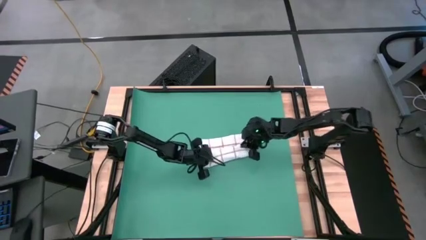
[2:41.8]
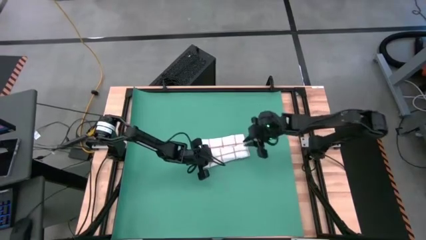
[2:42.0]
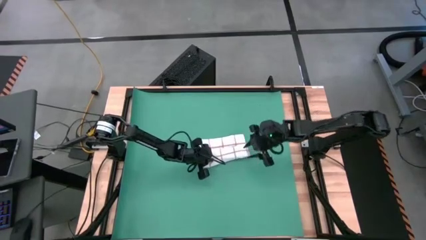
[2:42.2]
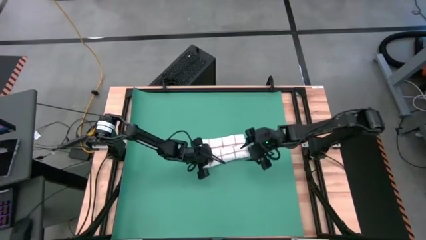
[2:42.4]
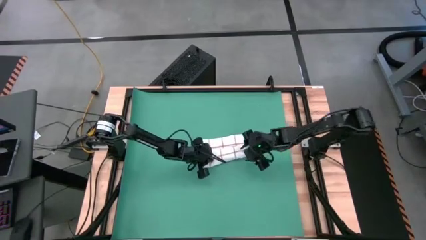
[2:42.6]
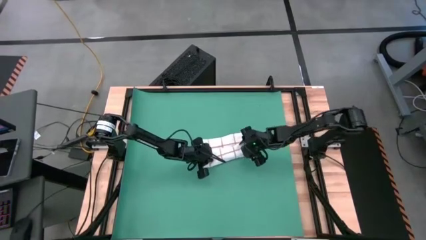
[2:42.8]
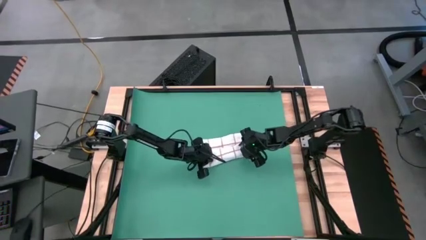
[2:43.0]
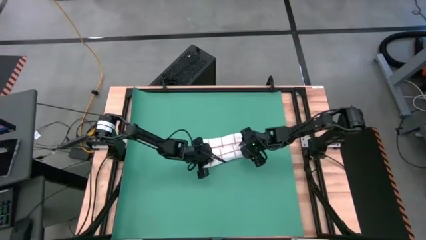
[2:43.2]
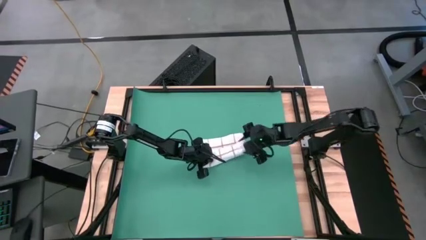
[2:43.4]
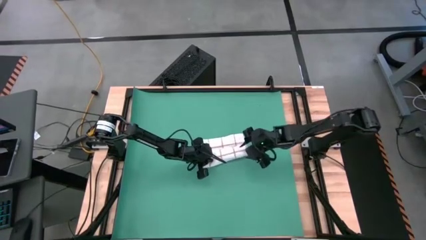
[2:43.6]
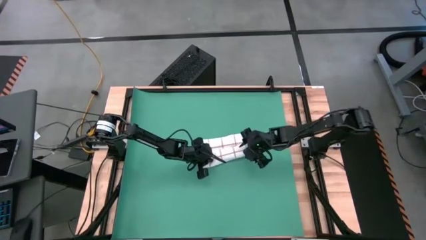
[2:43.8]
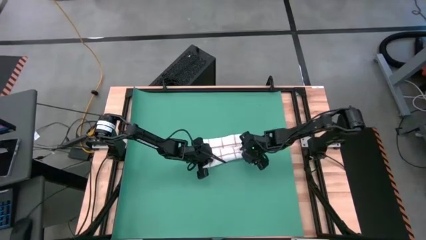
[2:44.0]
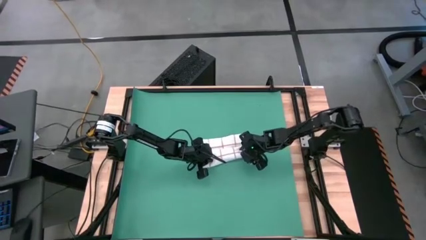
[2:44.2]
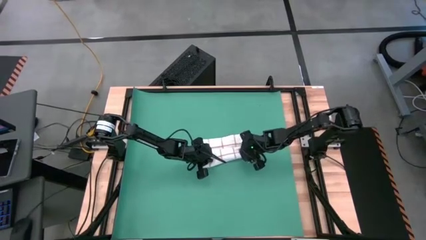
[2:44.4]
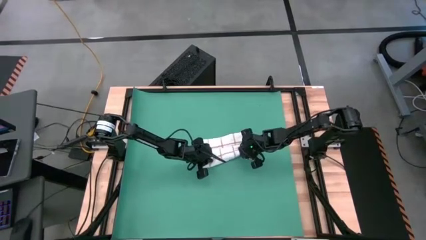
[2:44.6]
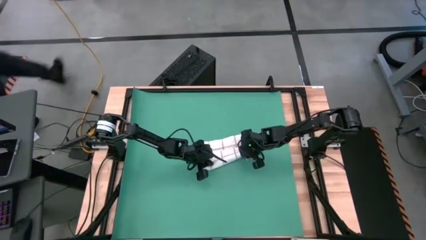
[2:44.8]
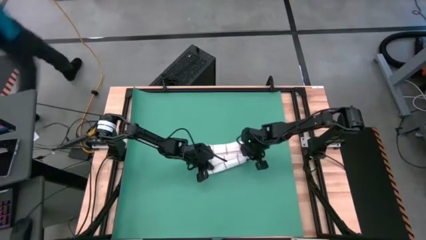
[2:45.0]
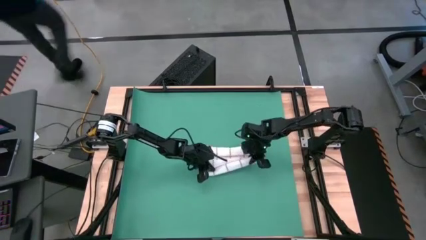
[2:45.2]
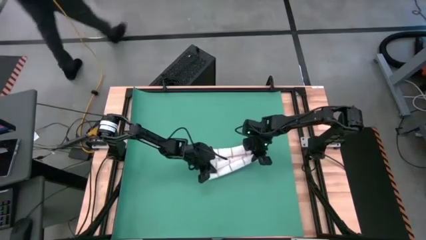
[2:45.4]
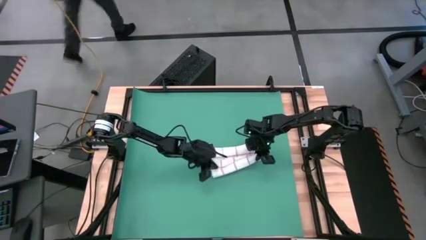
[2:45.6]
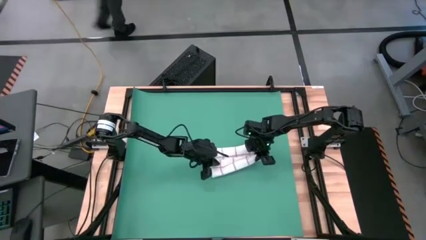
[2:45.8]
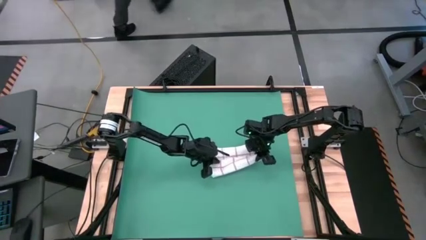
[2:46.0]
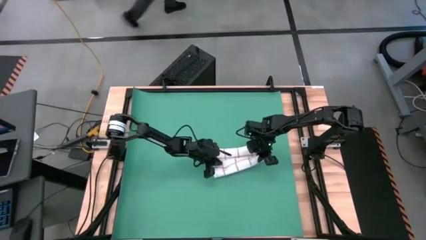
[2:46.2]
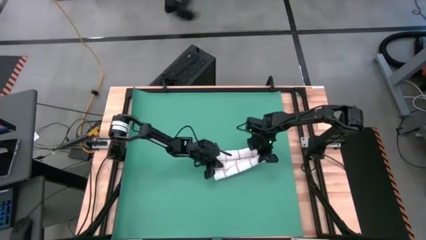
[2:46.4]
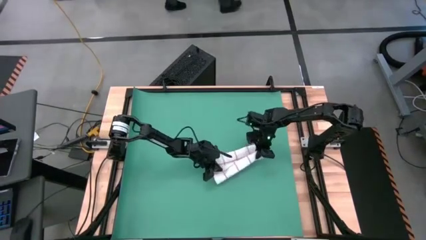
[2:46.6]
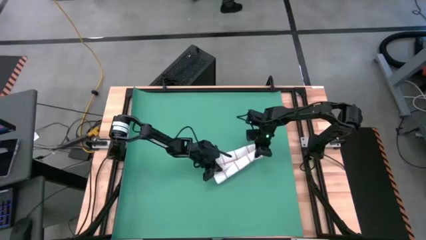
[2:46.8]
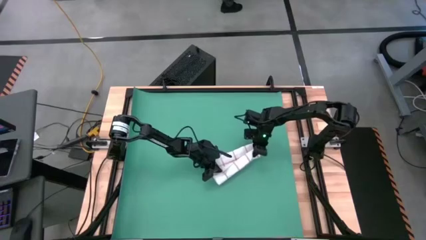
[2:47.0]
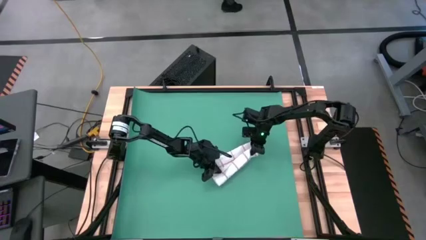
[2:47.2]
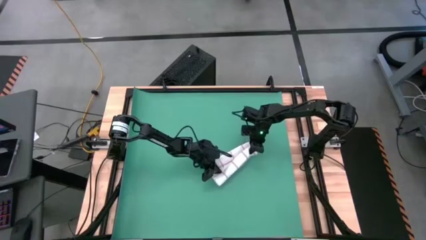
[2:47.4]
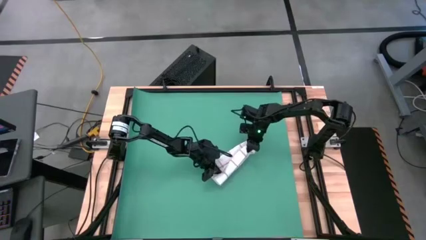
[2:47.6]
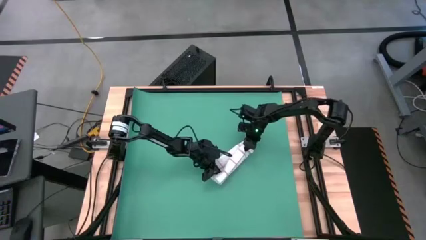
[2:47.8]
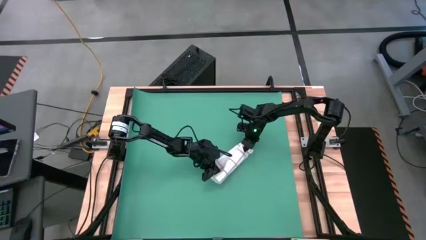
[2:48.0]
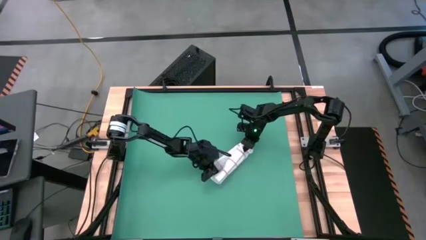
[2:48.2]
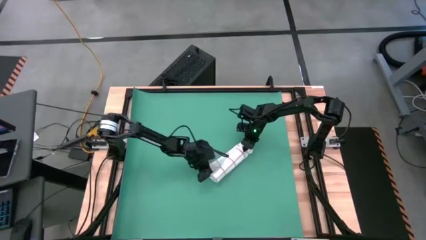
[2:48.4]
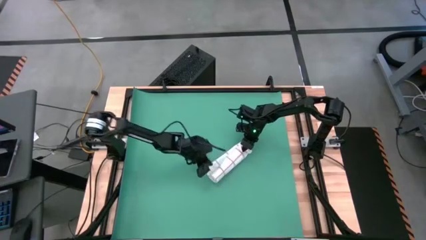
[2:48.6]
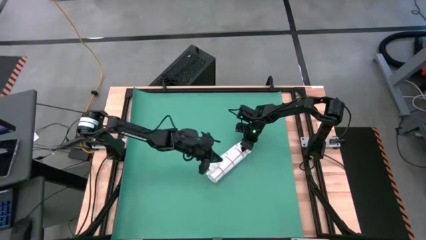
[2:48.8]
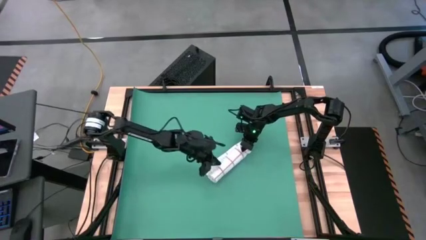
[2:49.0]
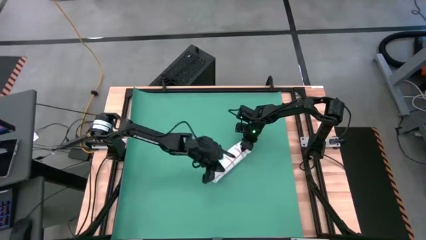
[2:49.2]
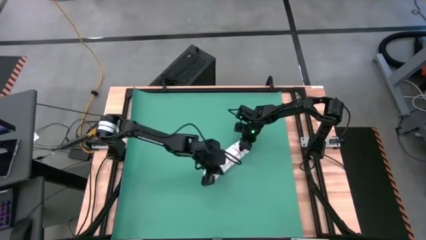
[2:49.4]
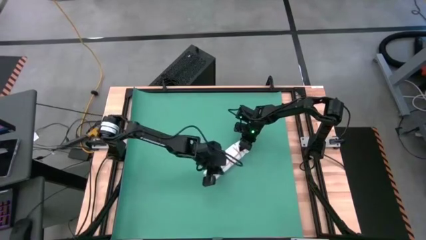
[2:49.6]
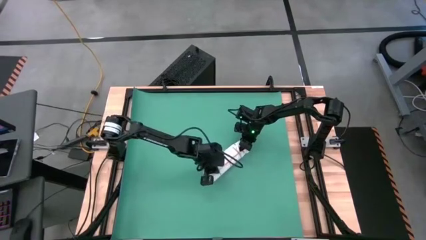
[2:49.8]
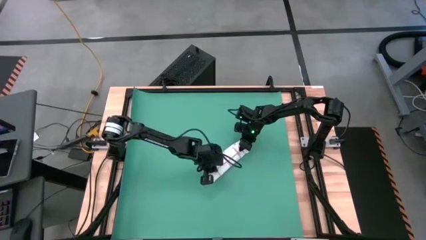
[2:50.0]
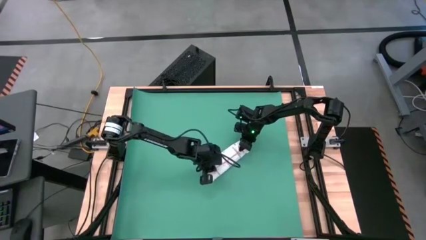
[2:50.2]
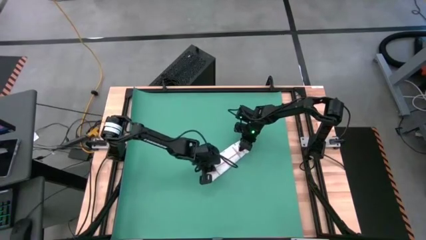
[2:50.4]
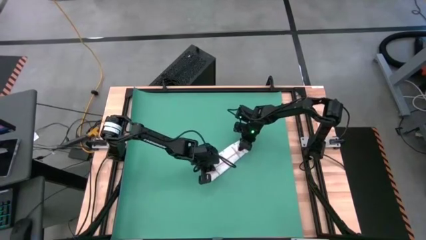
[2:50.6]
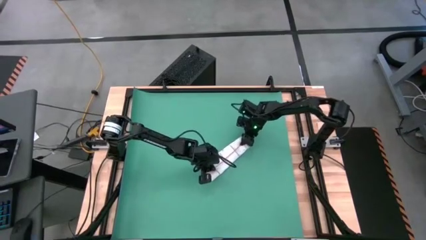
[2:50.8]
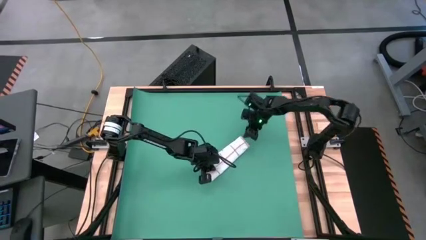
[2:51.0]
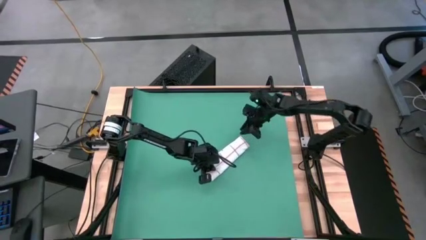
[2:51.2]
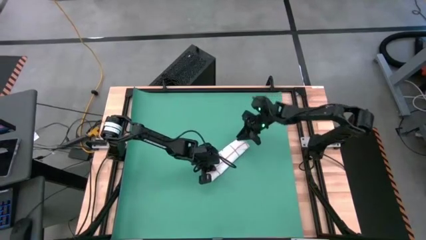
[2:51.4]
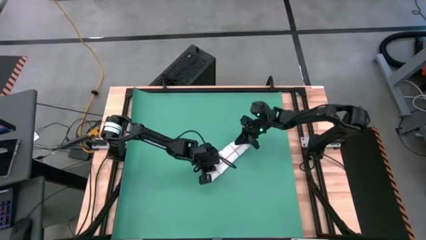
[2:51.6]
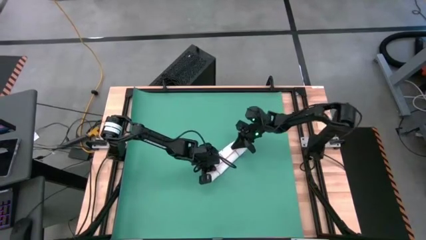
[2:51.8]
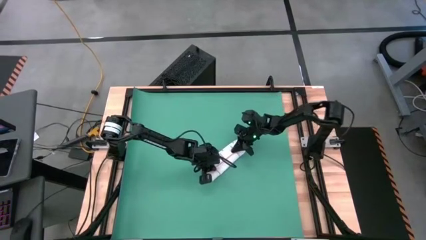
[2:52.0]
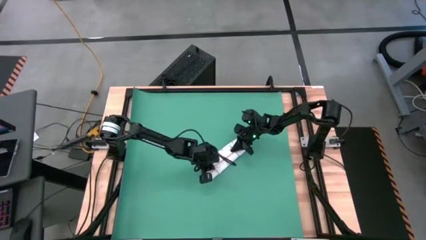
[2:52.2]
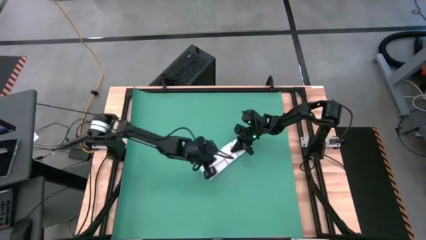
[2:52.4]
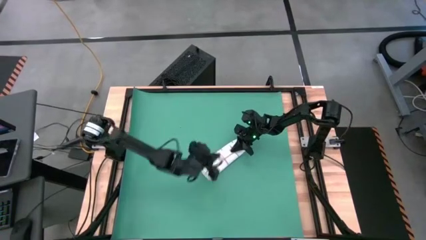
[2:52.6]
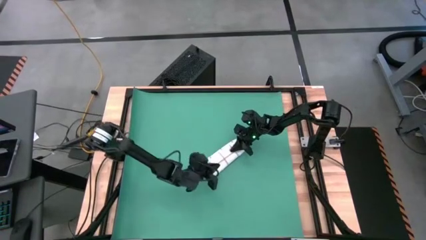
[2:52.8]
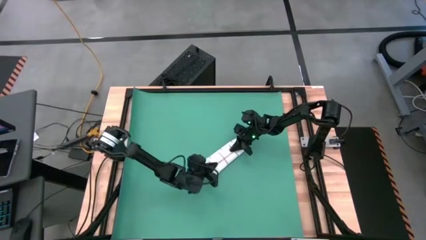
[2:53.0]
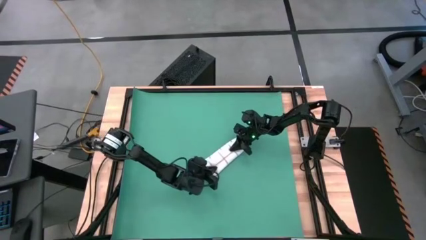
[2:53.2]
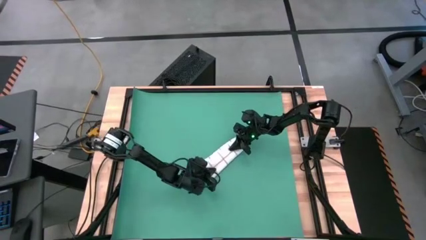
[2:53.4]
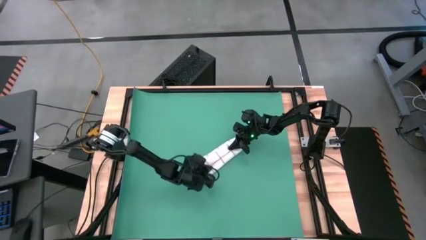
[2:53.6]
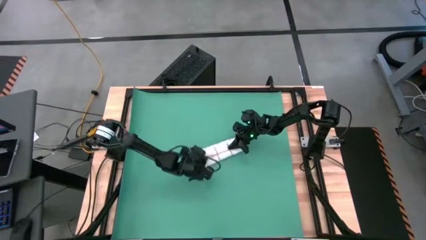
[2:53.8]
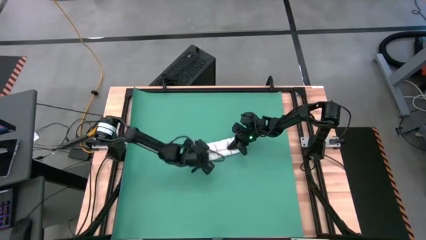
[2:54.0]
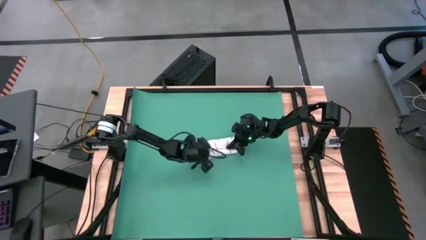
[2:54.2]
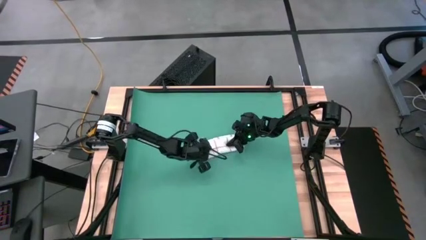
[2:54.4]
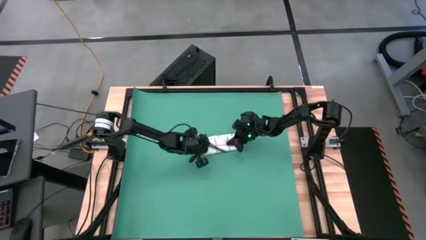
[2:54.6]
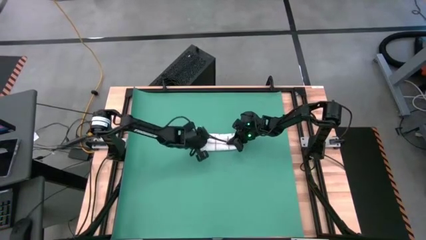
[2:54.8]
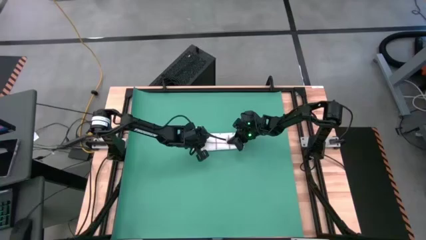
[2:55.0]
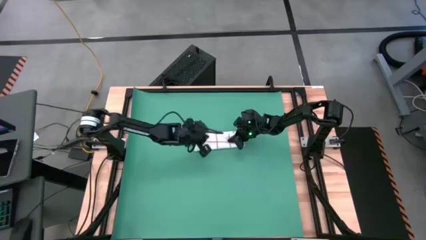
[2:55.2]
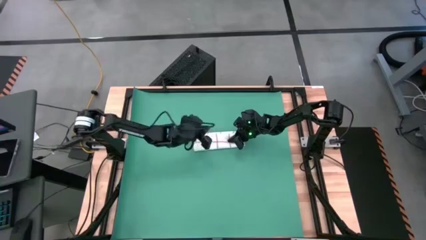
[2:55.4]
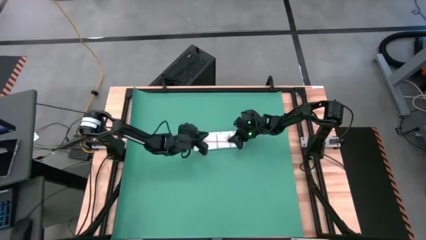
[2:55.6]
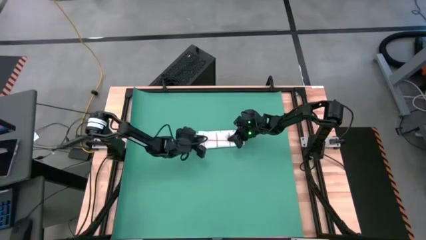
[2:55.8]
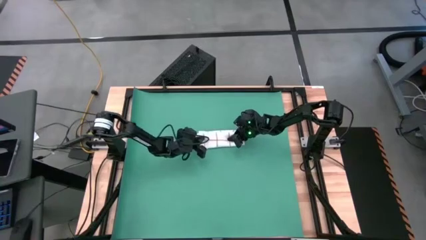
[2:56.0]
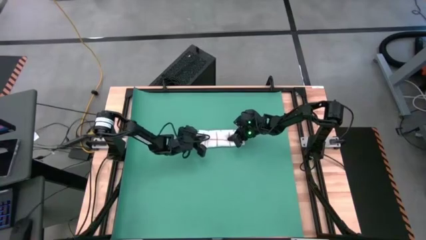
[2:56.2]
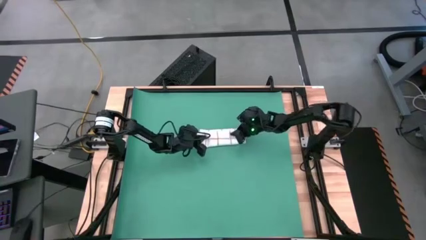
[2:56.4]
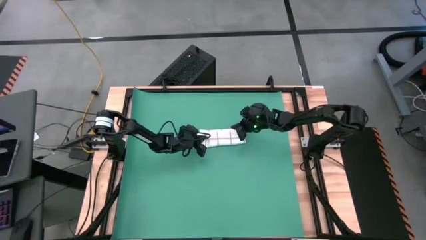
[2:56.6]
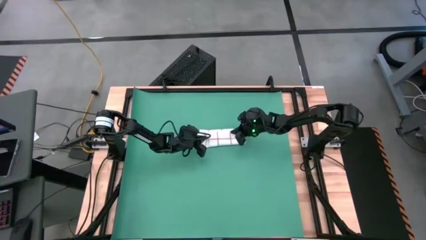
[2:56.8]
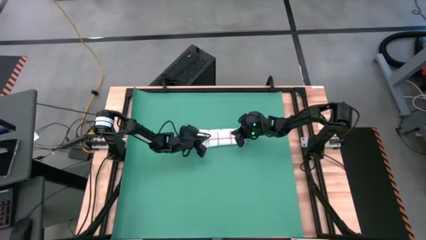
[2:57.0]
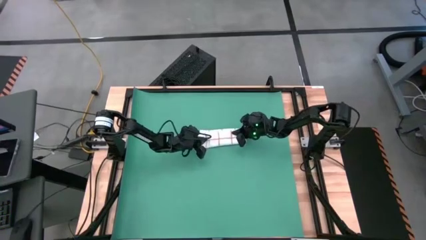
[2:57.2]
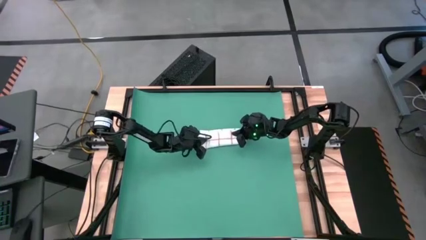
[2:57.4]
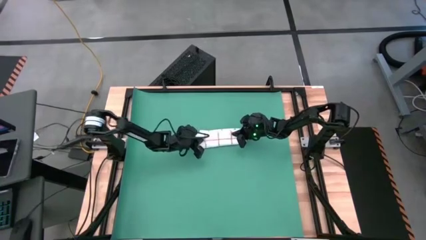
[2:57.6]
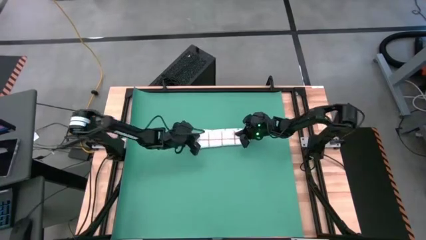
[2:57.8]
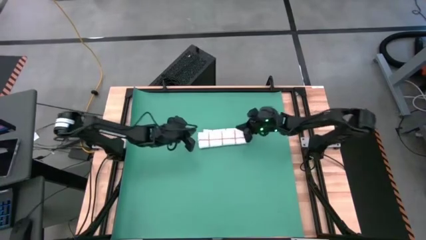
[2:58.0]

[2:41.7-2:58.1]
Task: Roll towel
Roll the white towel
